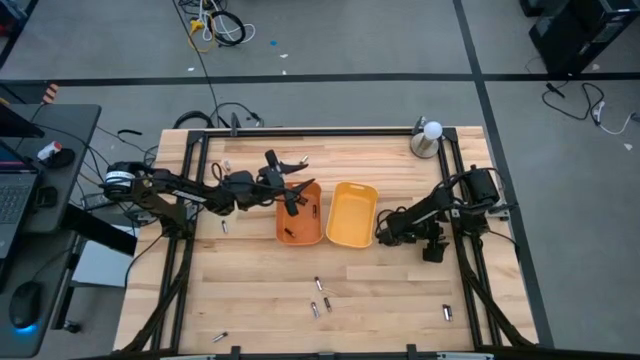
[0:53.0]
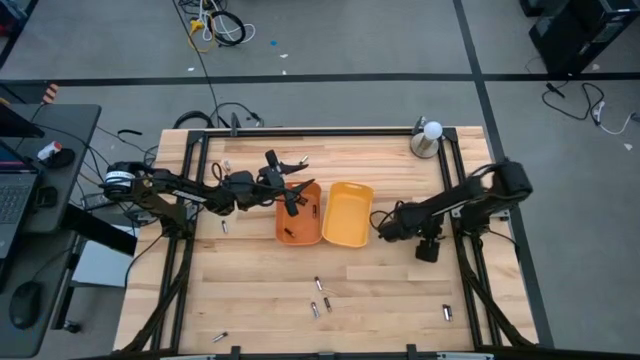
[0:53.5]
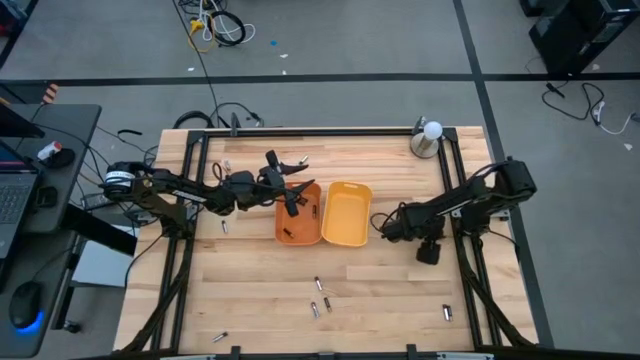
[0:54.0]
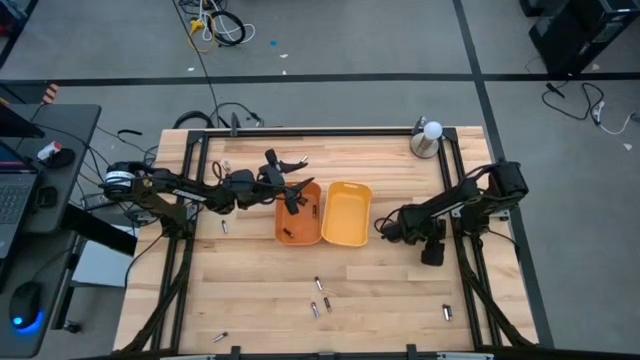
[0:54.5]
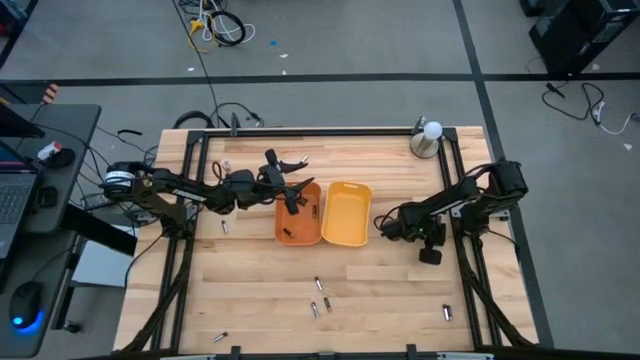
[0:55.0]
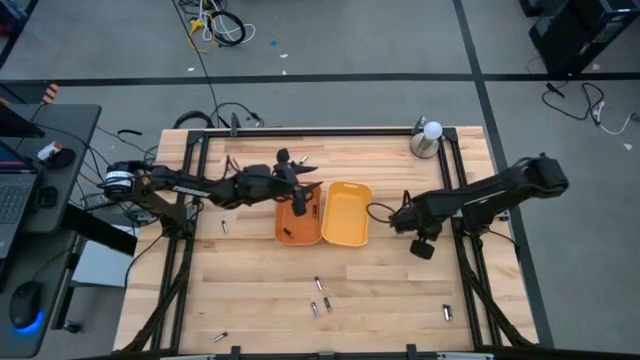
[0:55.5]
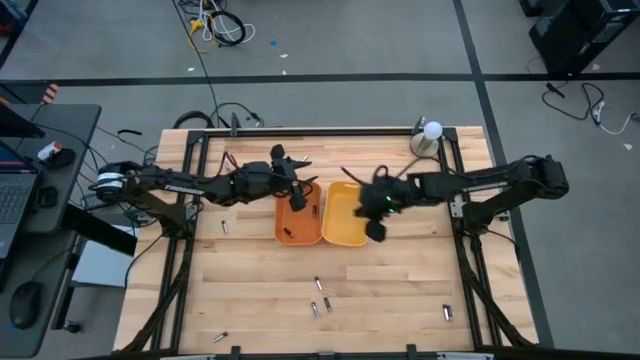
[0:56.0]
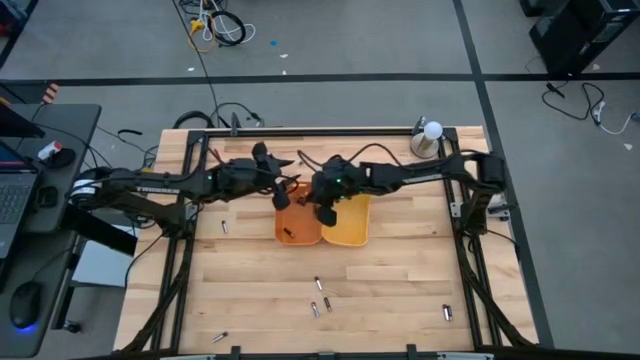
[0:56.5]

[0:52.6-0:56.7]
Task: Sort batteries
Put the black battery into the orange bin

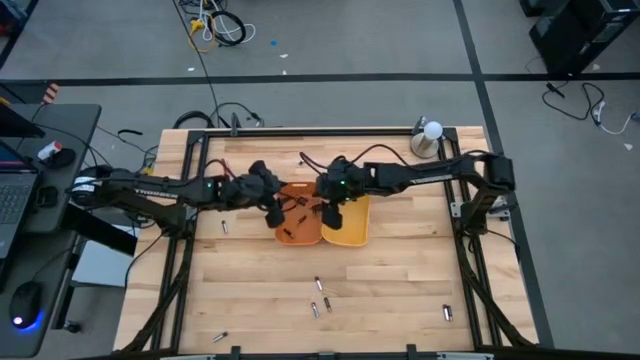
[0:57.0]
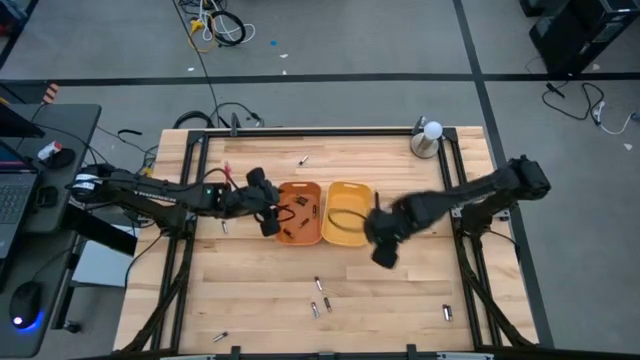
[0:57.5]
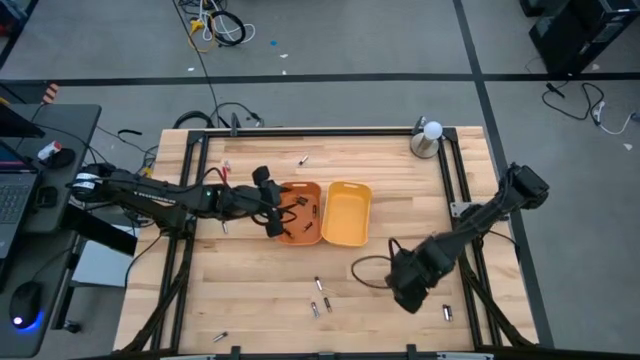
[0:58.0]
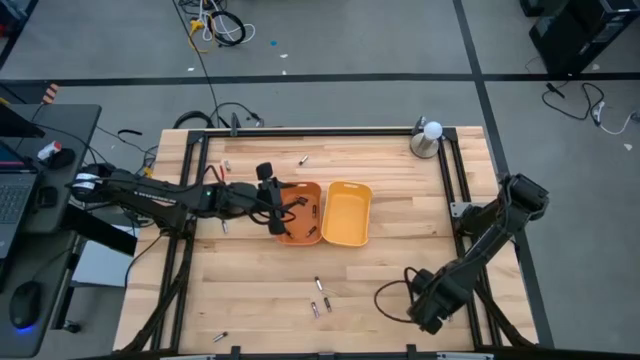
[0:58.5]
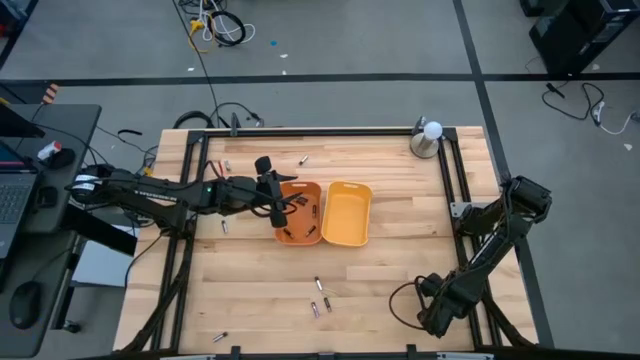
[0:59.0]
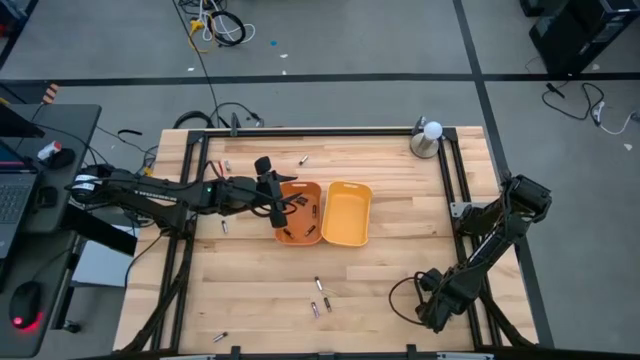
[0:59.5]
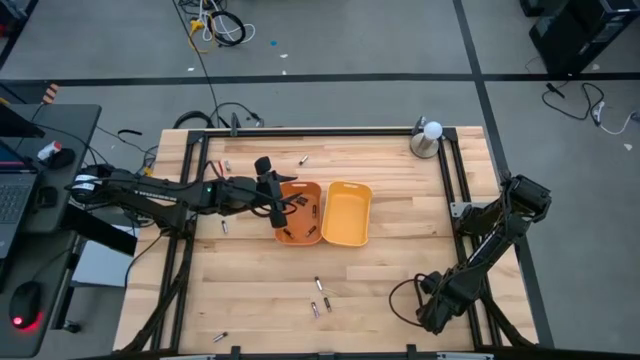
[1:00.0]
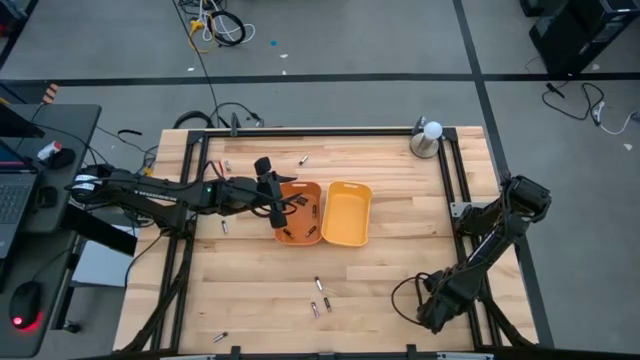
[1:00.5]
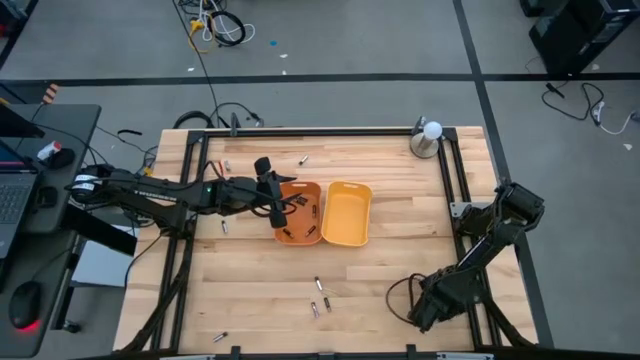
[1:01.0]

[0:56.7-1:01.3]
Put the black battery into the orange bin

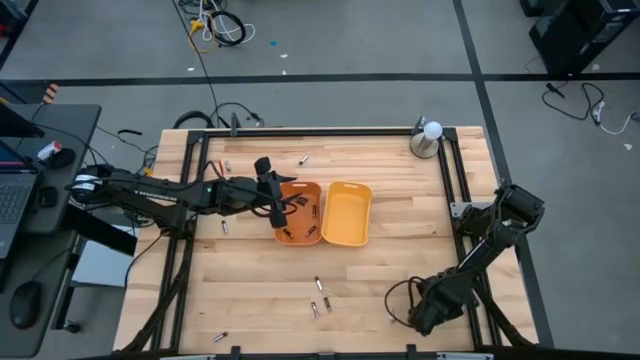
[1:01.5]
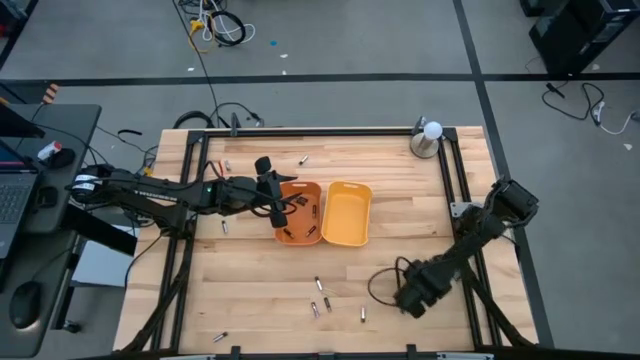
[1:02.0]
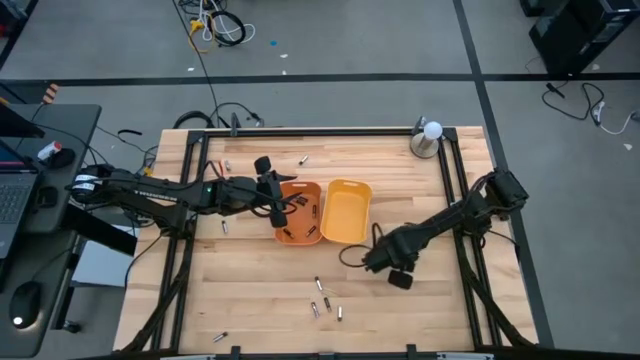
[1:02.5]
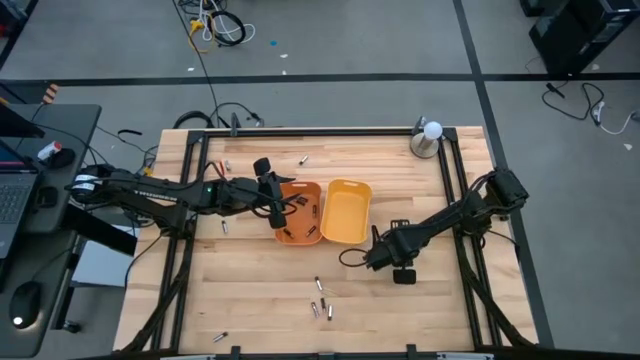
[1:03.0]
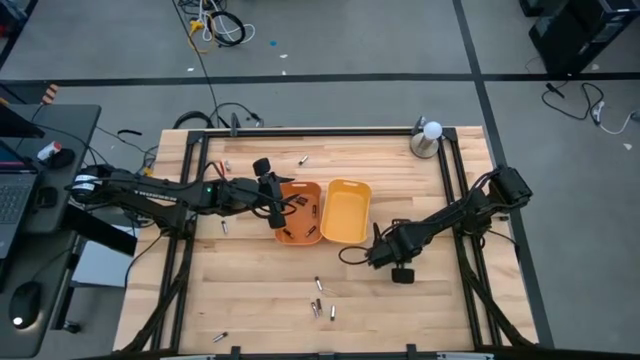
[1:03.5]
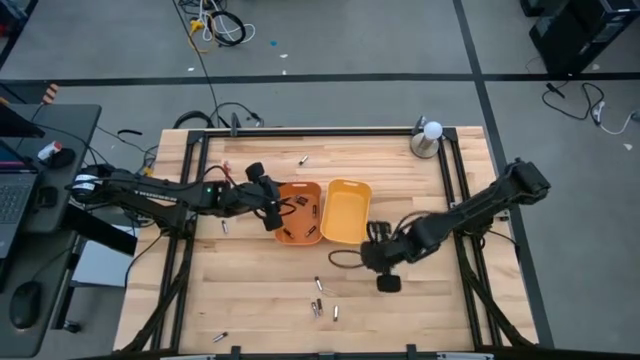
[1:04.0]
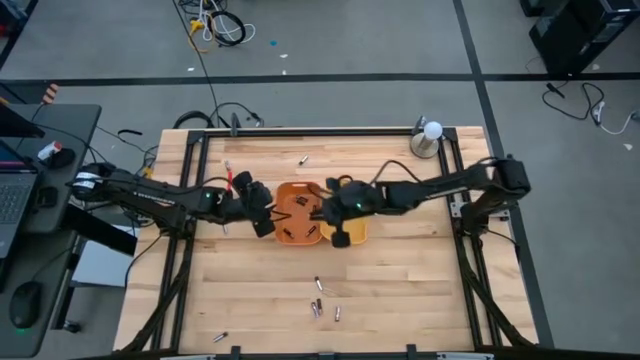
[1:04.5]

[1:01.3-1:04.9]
Put the black battery into the orange bin

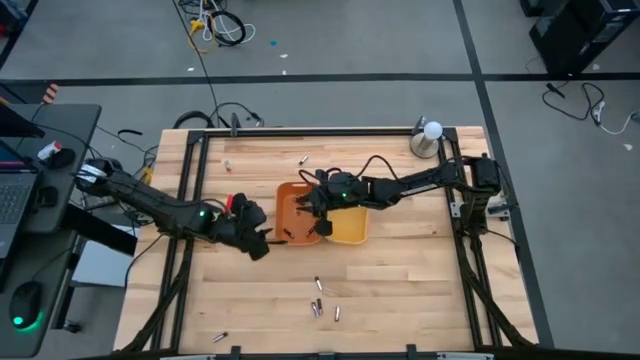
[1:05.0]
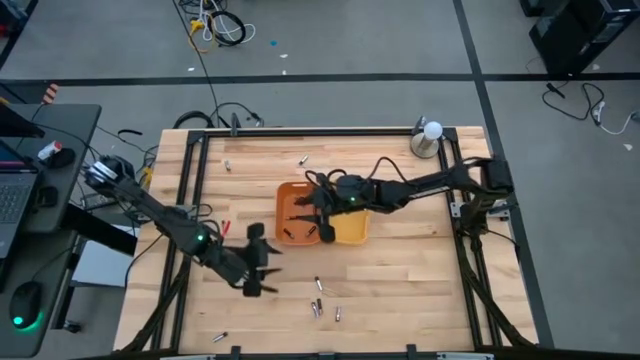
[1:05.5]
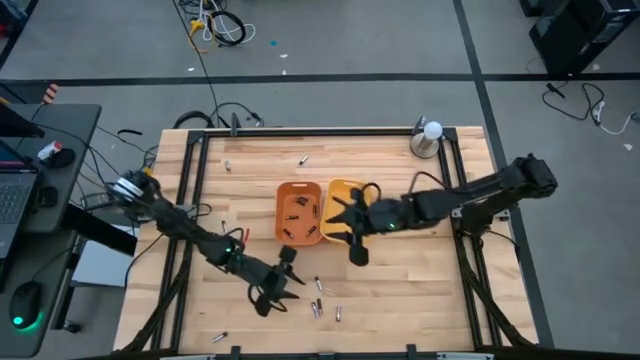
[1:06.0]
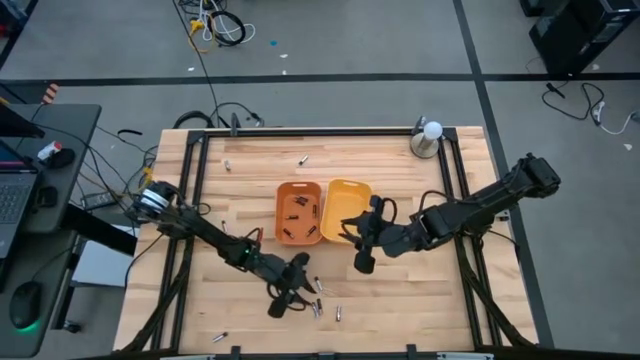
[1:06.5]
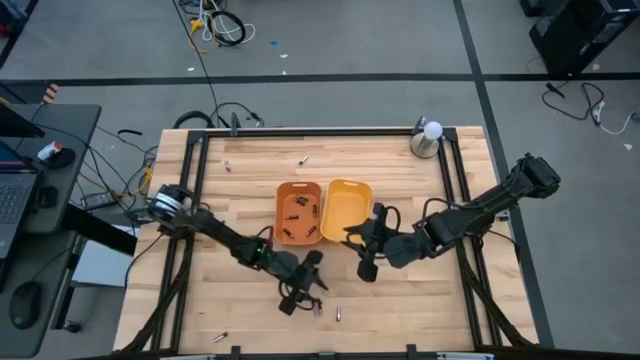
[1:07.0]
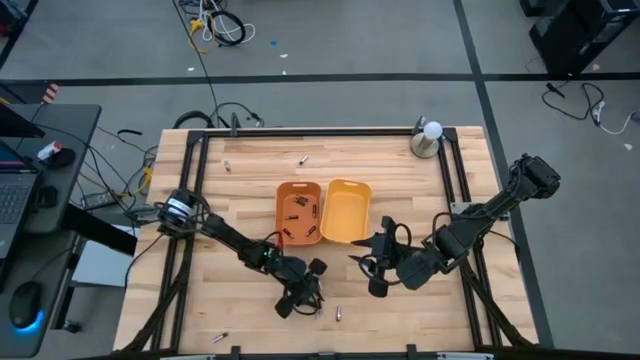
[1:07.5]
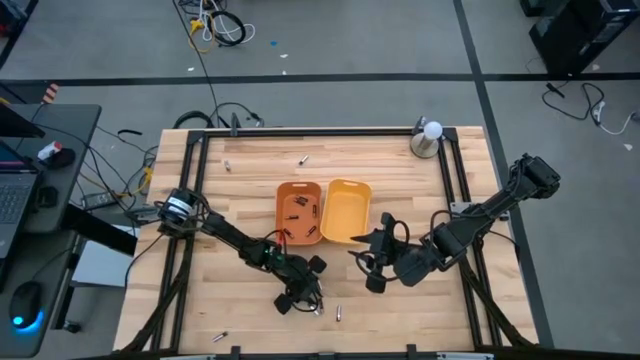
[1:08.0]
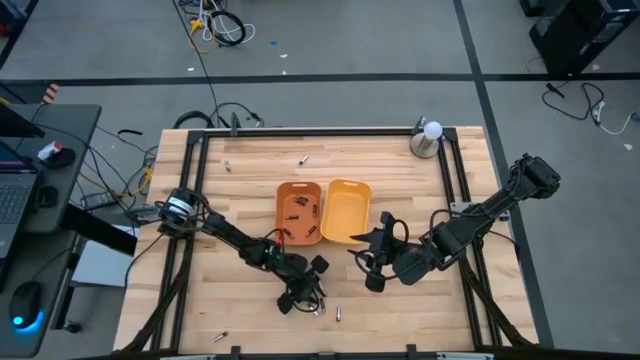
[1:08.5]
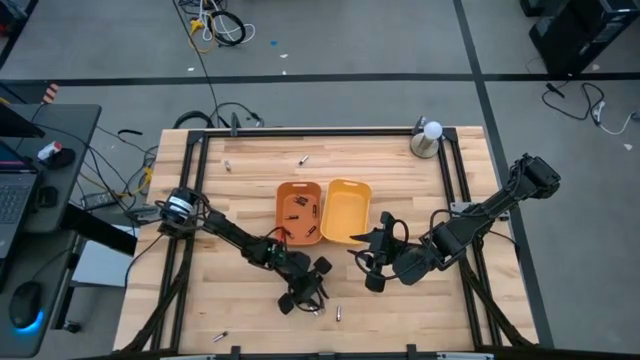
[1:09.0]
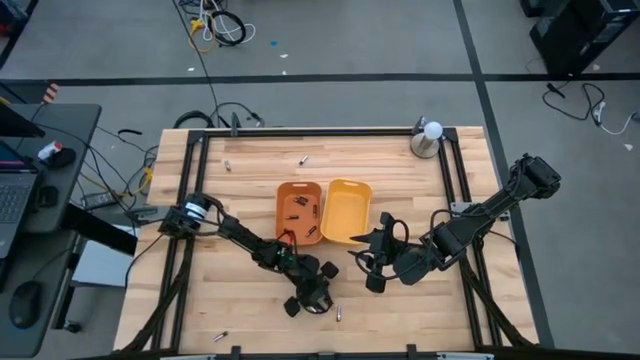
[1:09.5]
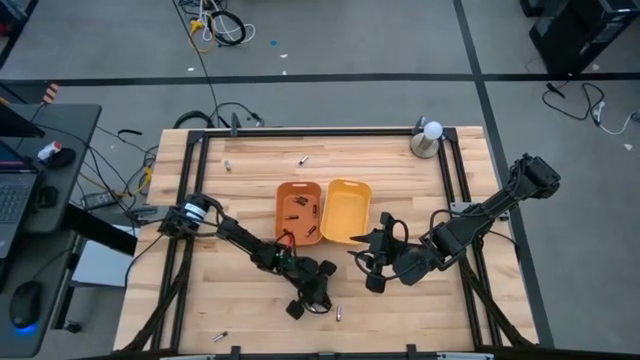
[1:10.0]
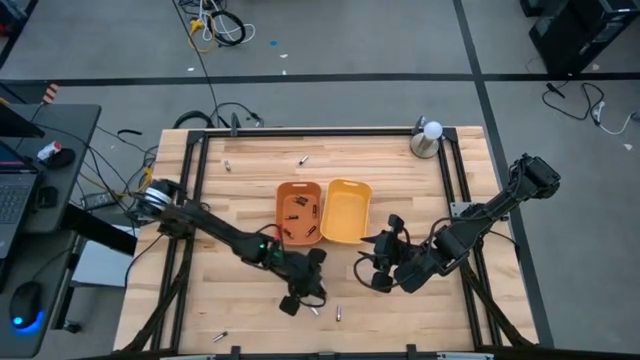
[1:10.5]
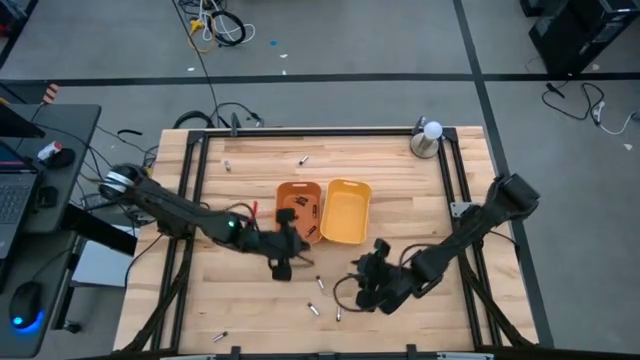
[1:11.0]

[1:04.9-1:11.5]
Put the black battery into the orange bin

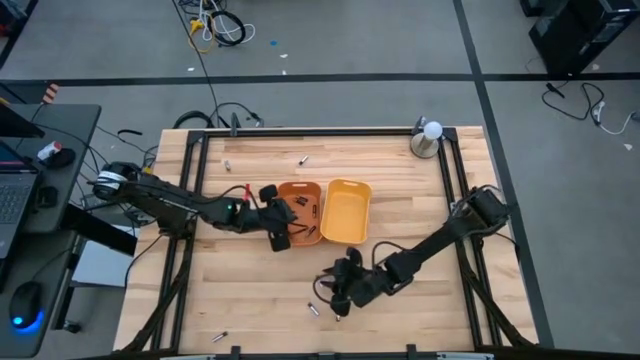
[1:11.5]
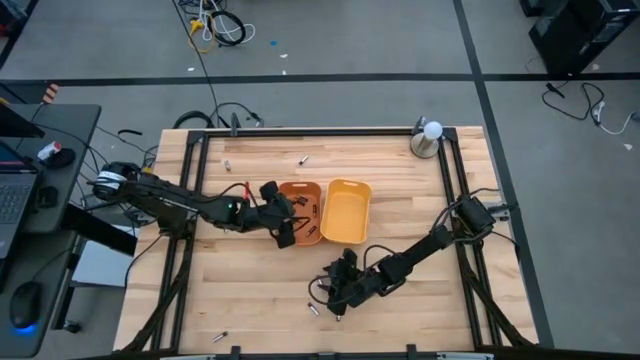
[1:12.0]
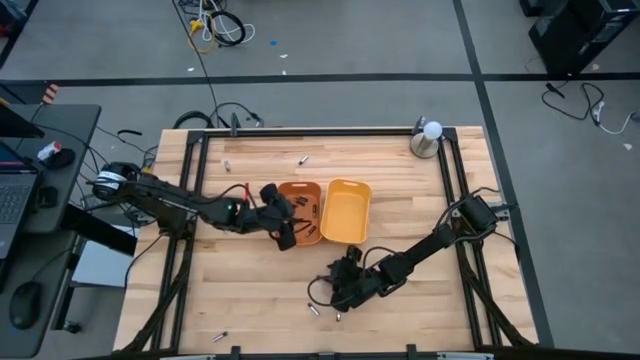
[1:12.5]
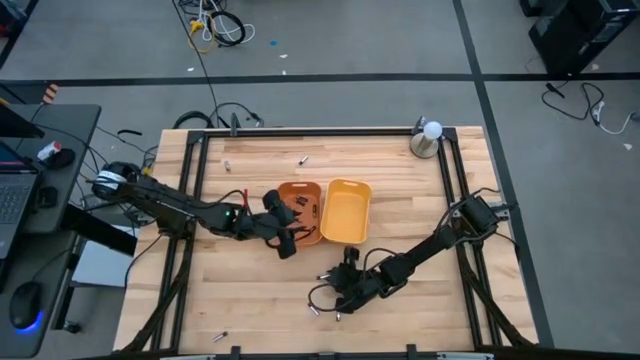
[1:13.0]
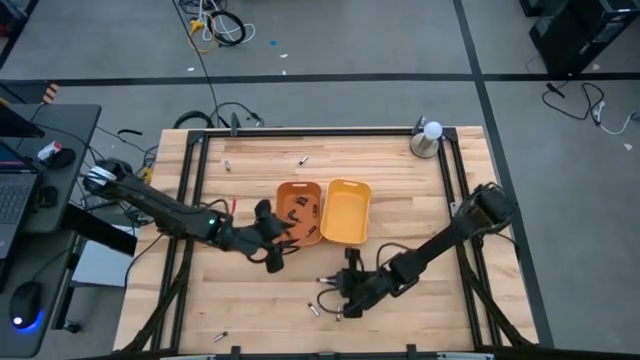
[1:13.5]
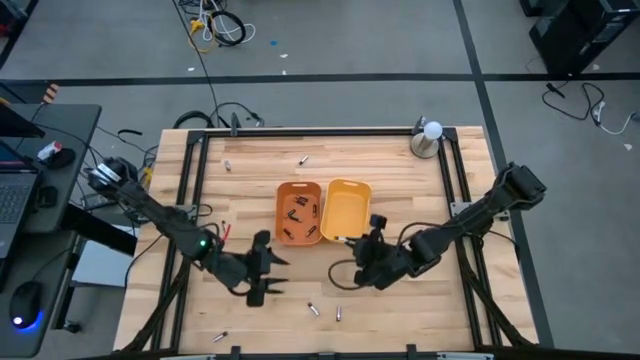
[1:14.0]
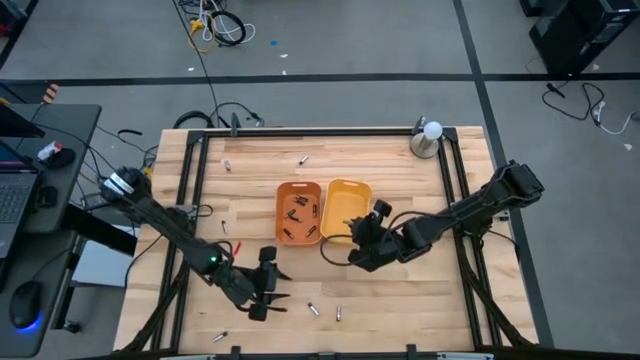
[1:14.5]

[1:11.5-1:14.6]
Put the silver battery into the yellow bin

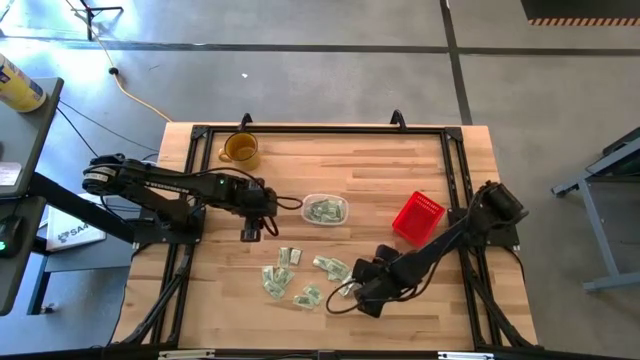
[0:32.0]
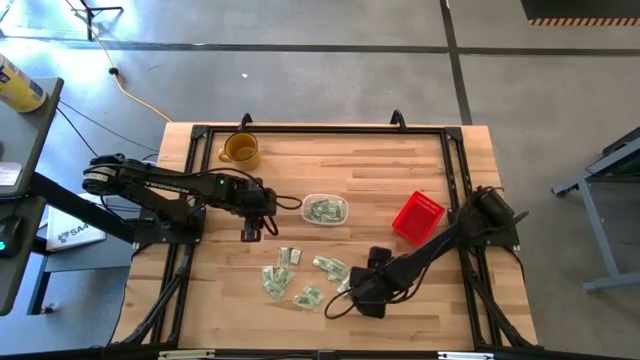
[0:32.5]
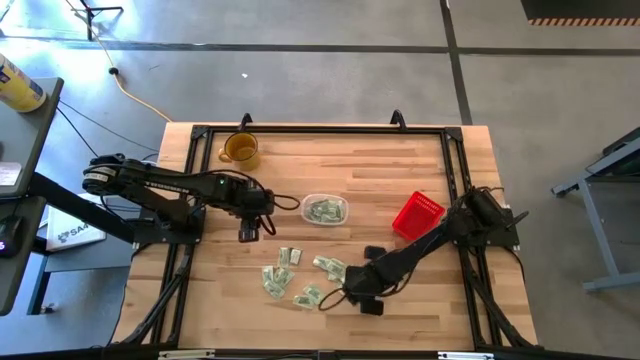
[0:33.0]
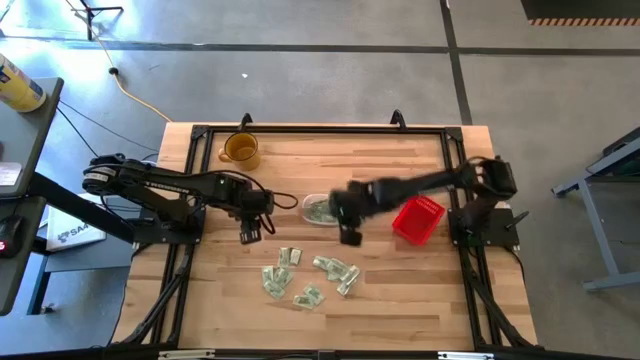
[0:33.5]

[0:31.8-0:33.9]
Task: Pick and place items into bin
Put the white stevia packet into the transparent bin
